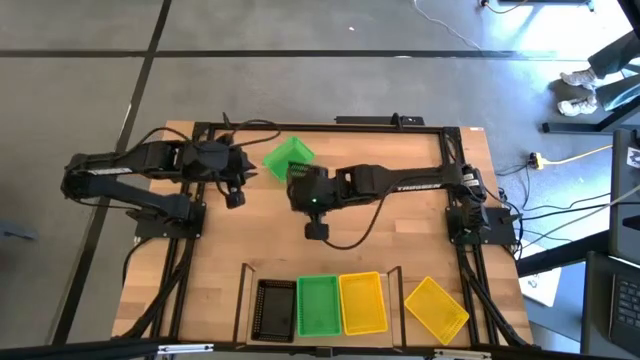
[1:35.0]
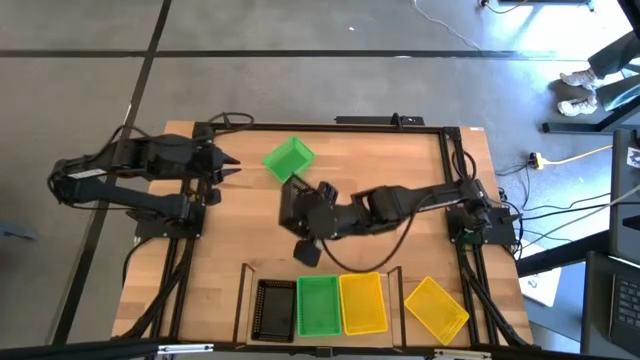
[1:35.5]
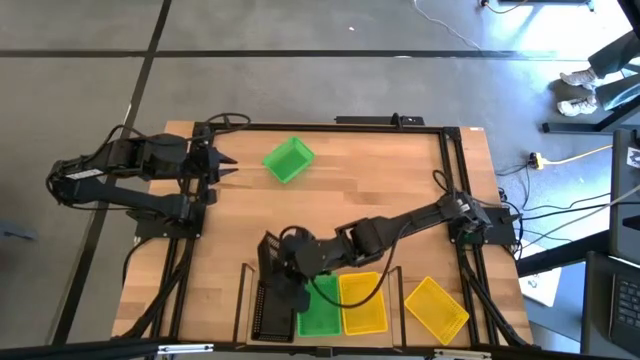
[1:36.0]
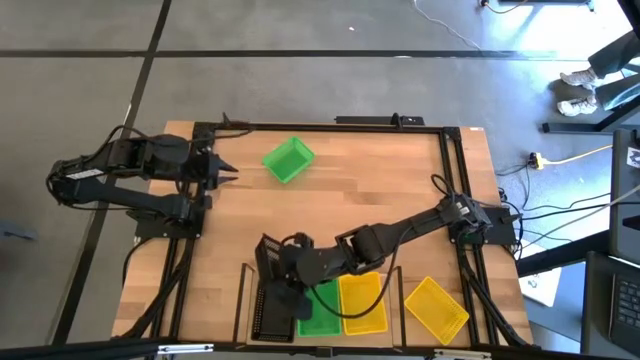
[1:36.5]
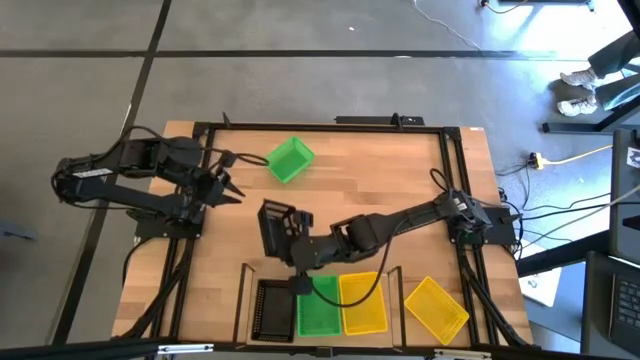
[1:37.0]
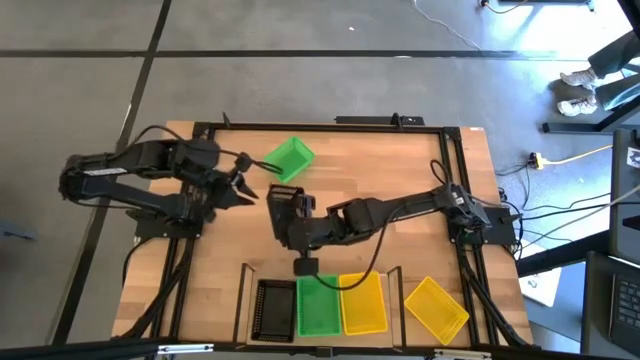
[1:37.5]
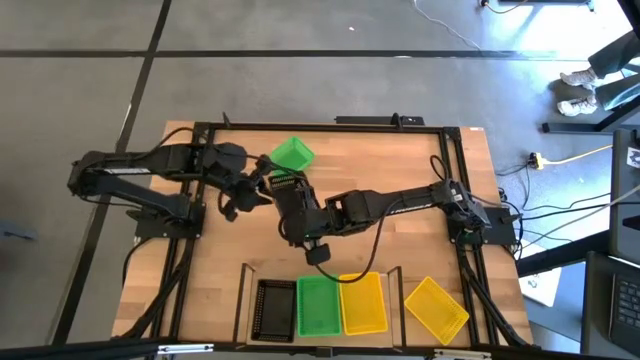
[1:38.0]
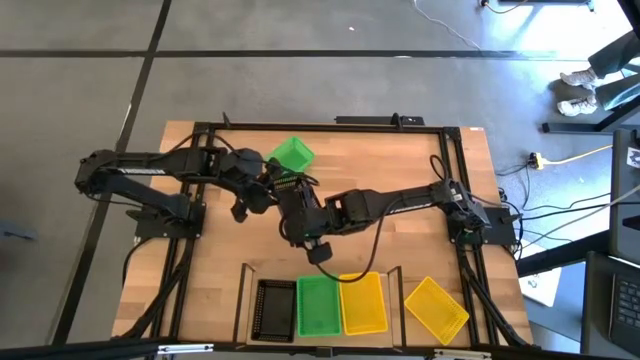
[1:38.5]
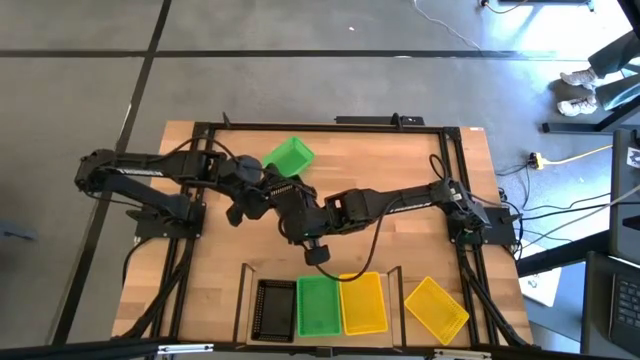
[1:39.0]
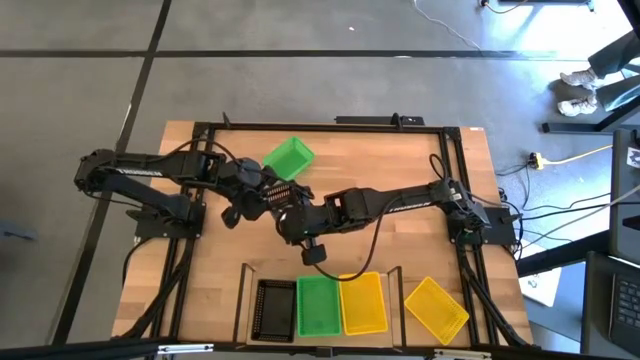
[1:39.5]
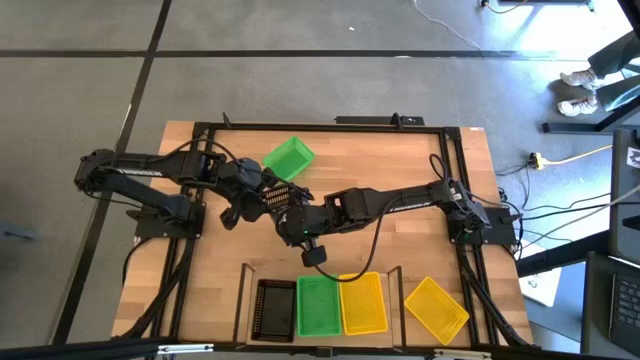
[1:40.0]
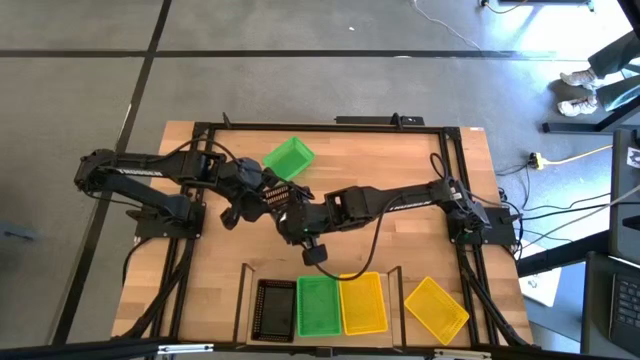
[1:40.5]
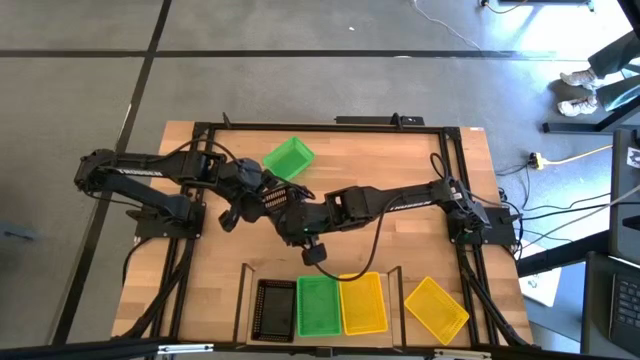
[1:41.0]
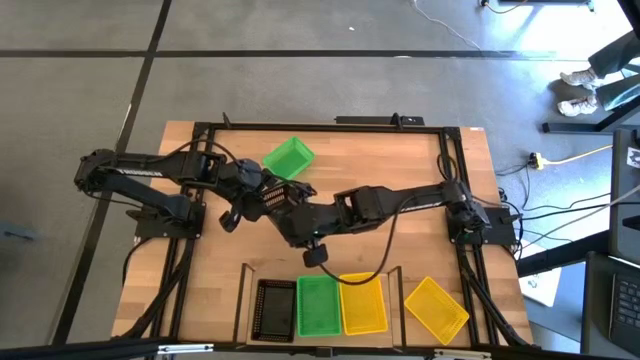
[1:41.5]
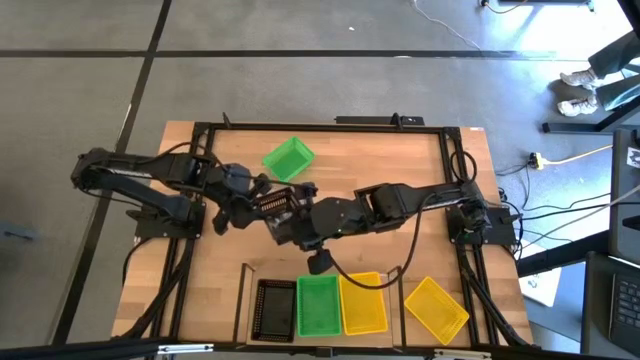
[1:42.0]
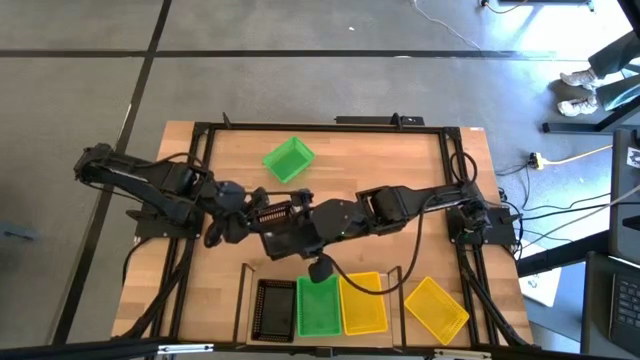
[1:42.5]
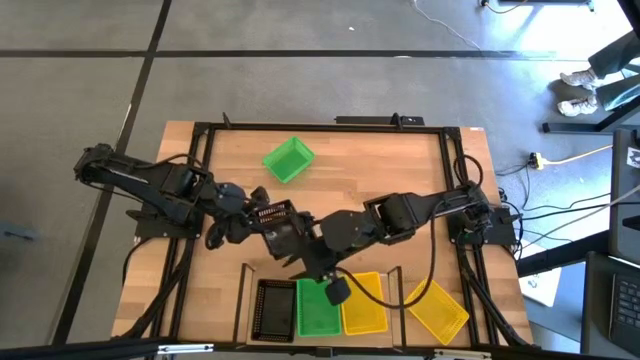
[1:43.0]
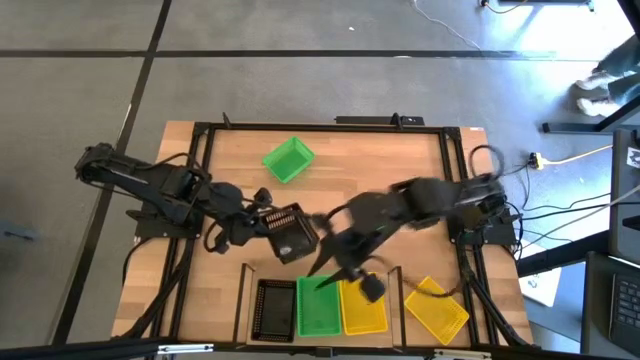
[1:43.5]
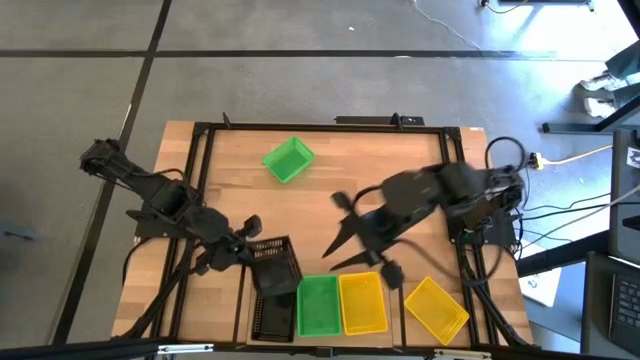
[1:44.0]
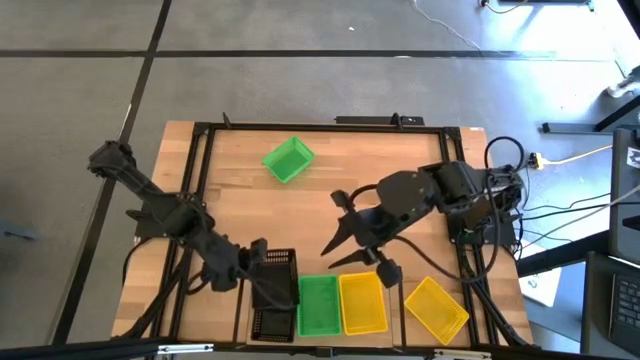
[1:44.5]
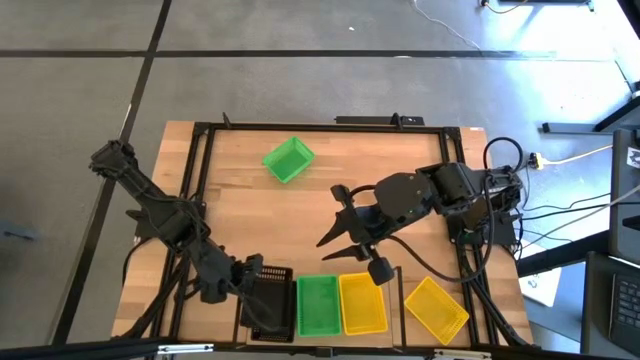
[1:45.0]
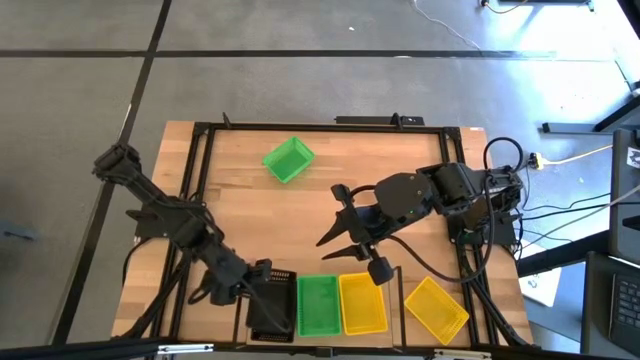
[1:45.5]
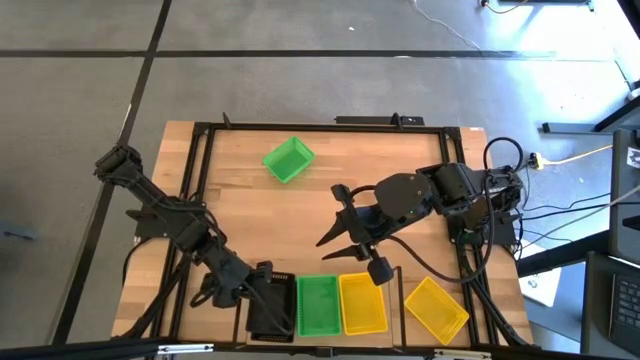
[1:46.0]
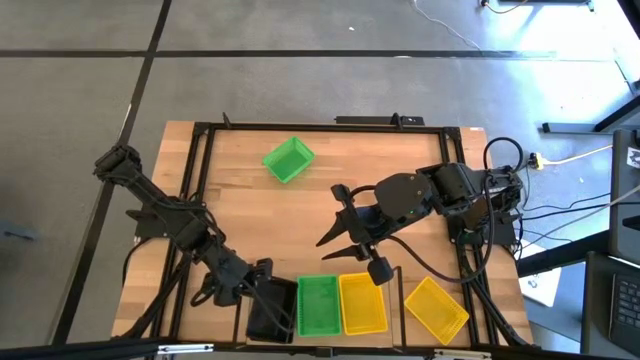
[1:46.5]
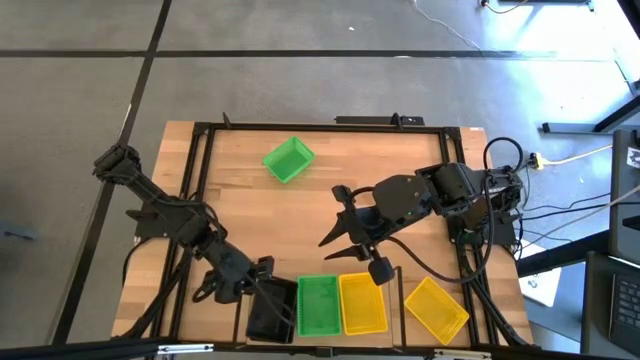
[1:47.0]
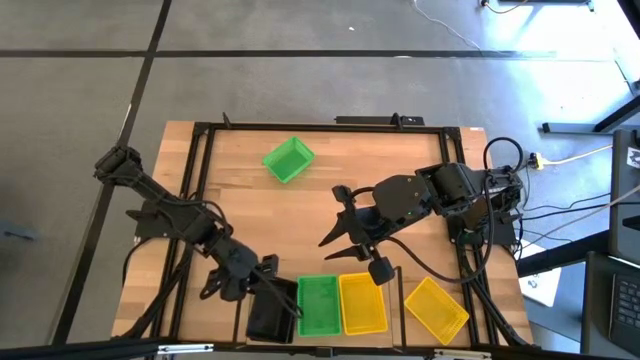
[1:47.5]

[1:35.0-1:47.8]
Task: Stack baskets on shelf by color
Stack the black basket on top of the black baskets on the shelf

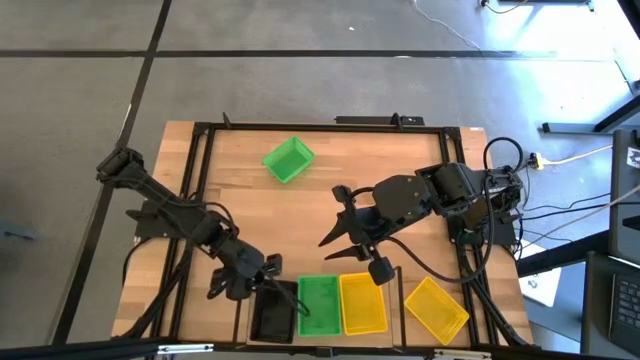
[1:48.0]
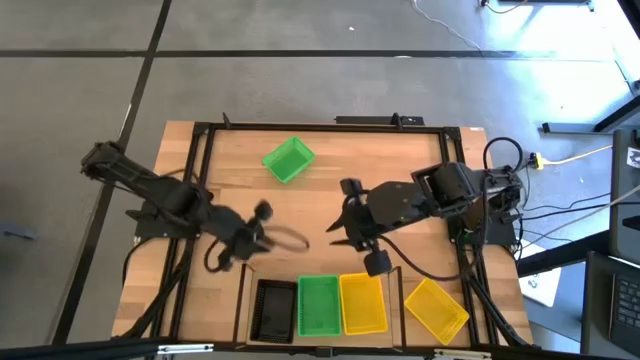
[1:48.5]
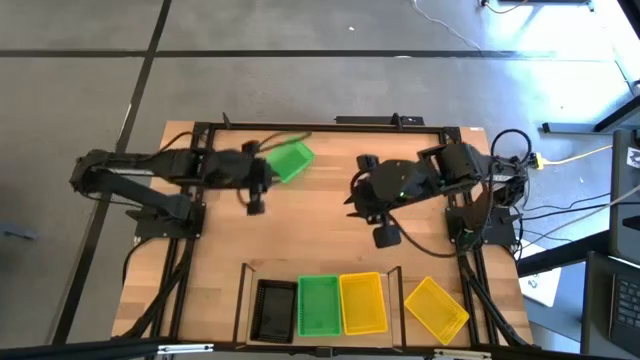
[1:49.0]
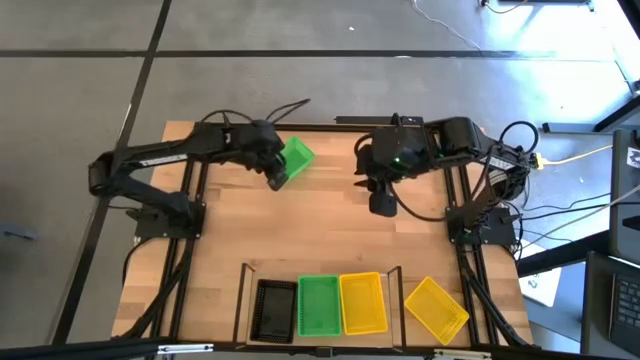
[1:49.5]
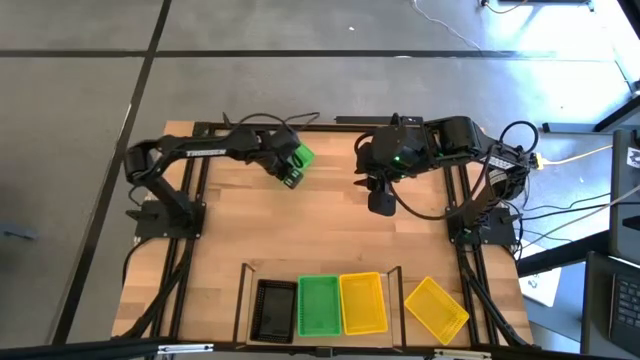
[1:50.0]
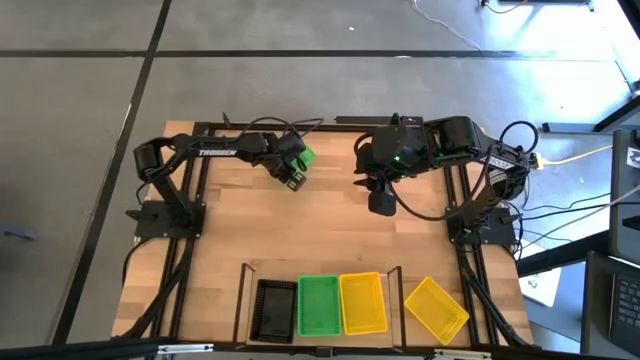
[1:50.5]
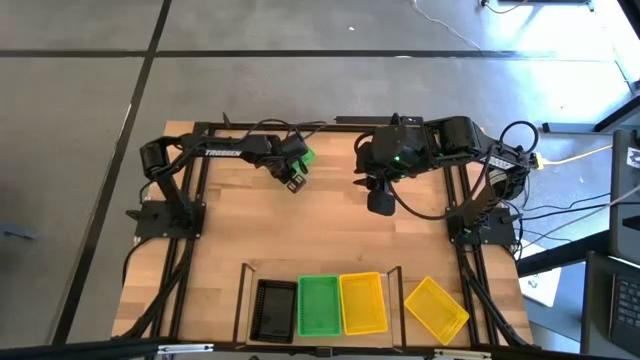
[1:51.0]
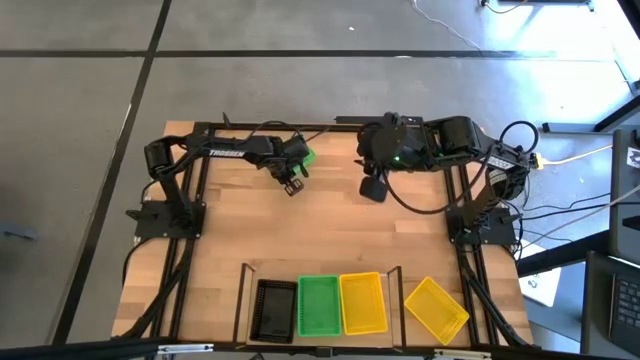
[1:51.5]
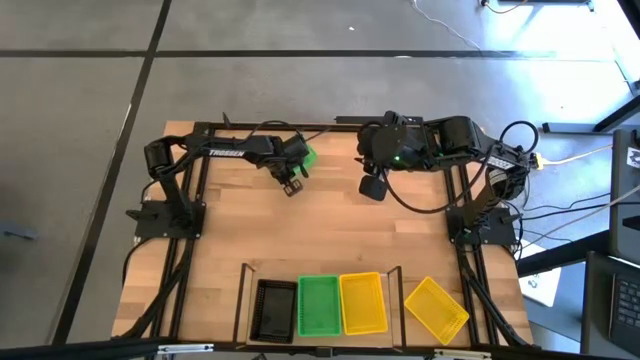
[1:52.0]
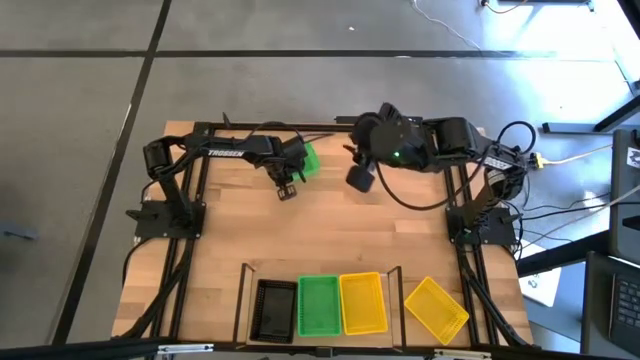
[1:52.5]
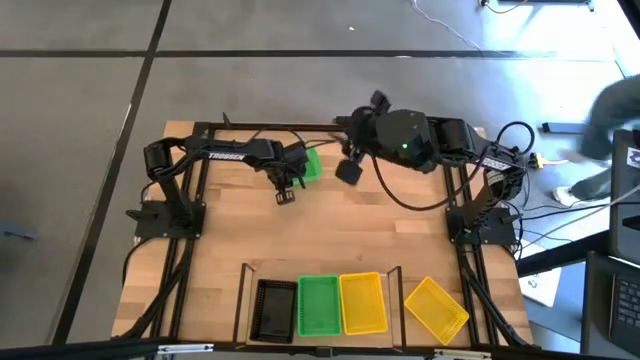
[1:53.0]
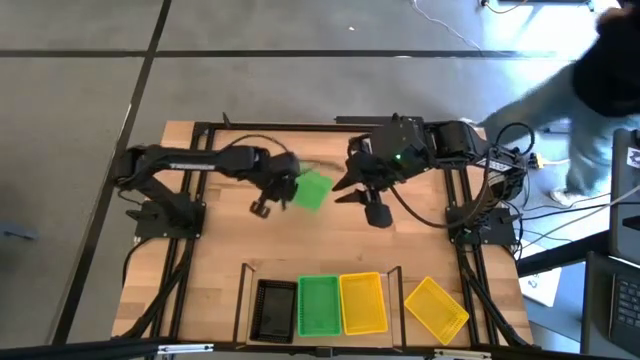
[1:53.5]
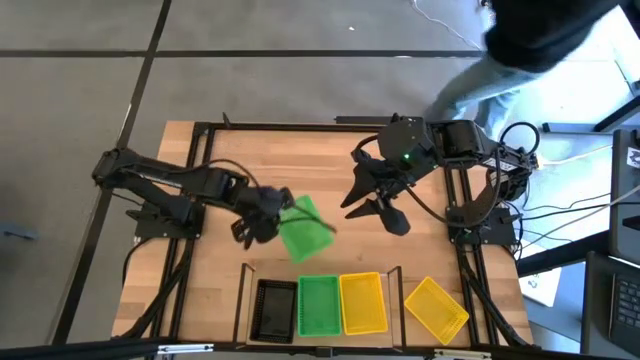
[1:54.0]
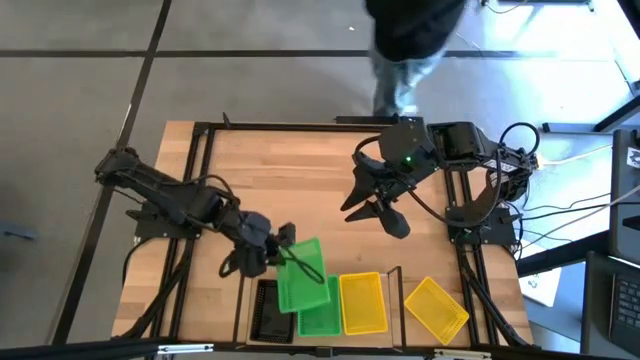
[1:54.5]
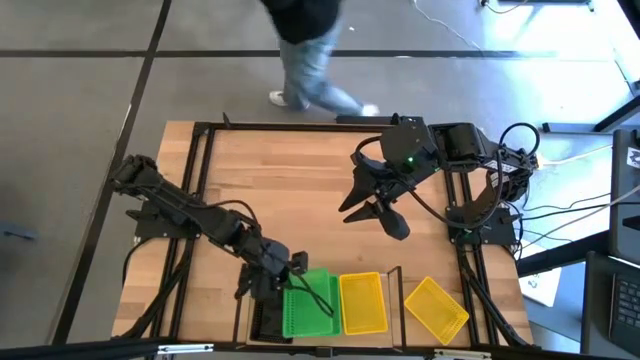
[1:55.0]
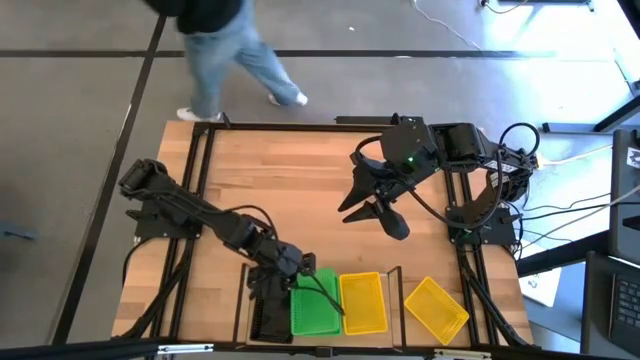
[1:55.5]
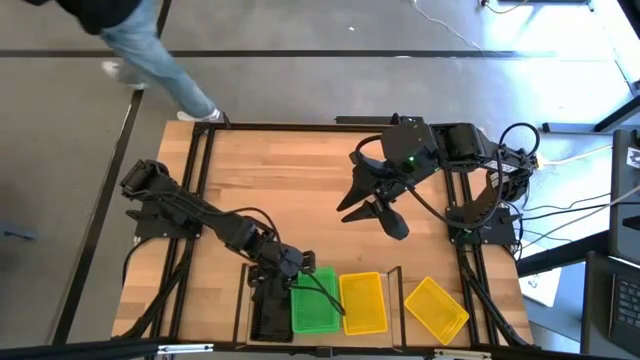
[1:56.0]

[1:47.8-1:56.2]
Stack the green basket on top of the green baskets on the shelf
